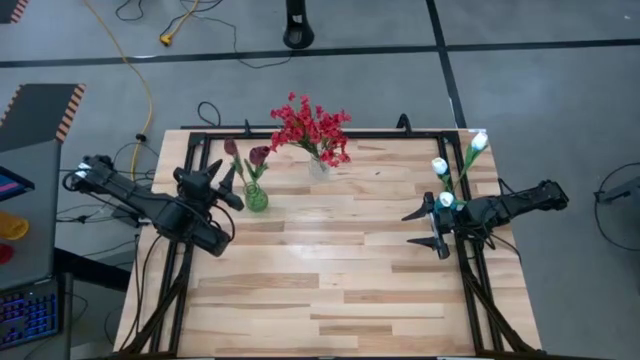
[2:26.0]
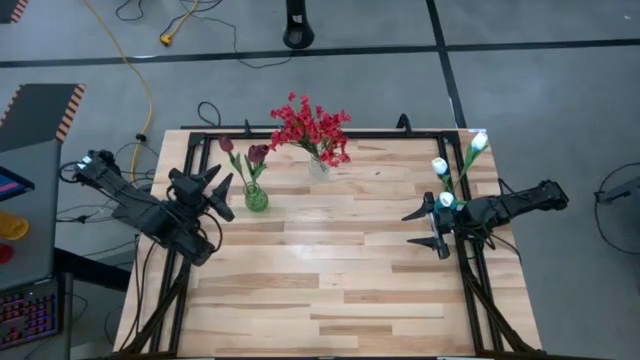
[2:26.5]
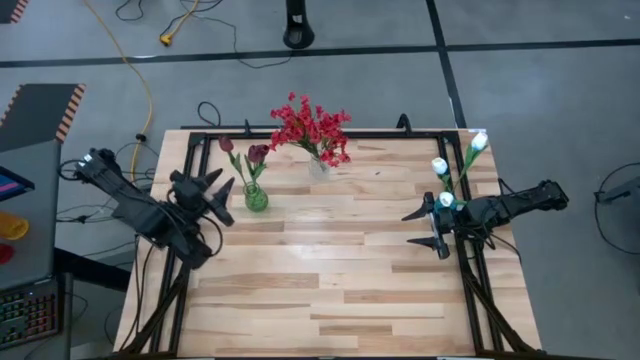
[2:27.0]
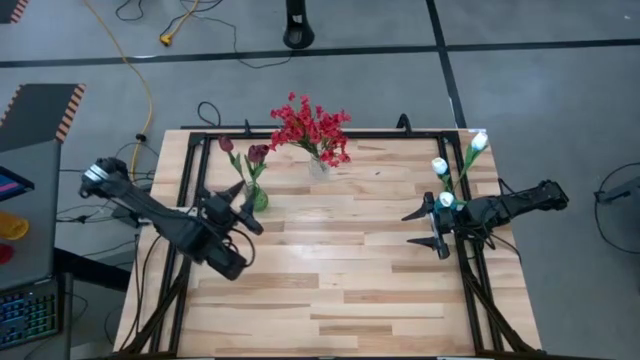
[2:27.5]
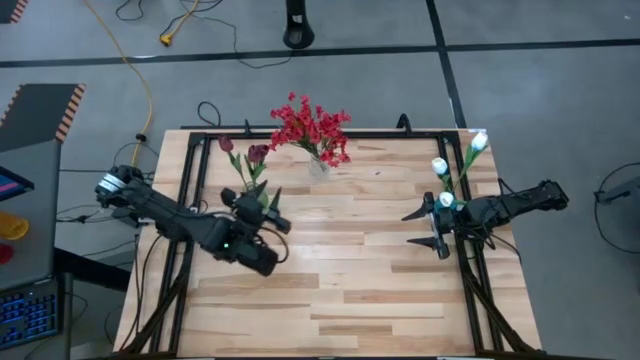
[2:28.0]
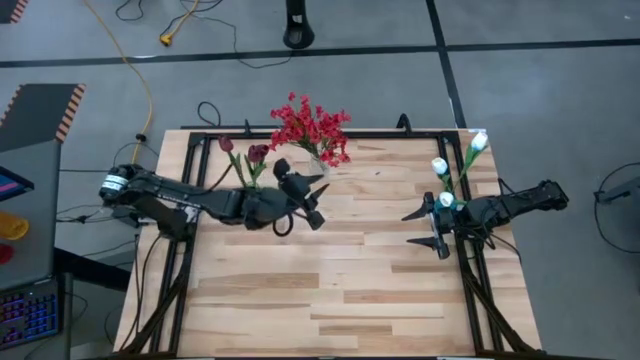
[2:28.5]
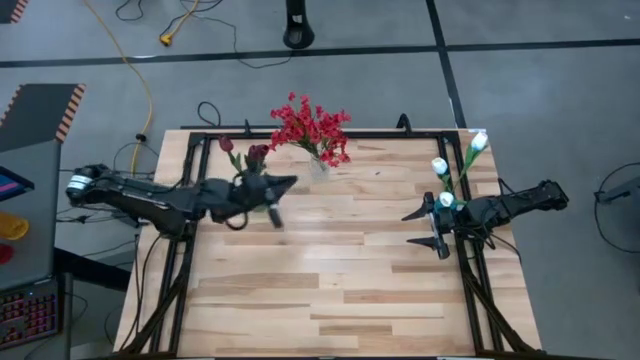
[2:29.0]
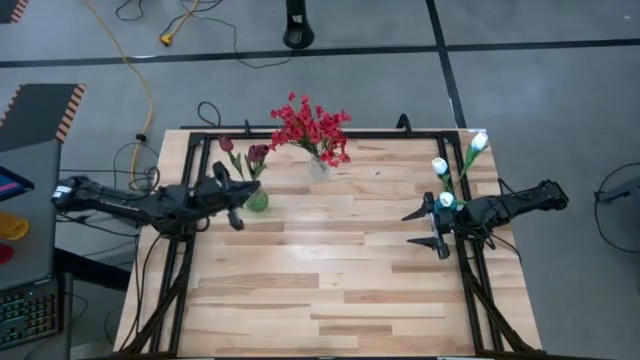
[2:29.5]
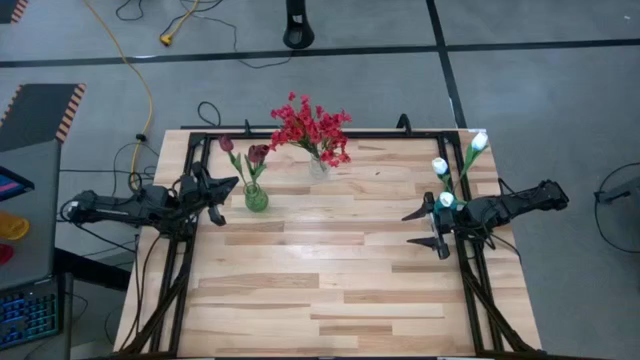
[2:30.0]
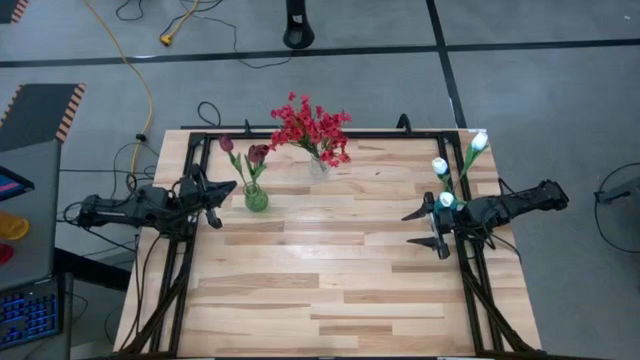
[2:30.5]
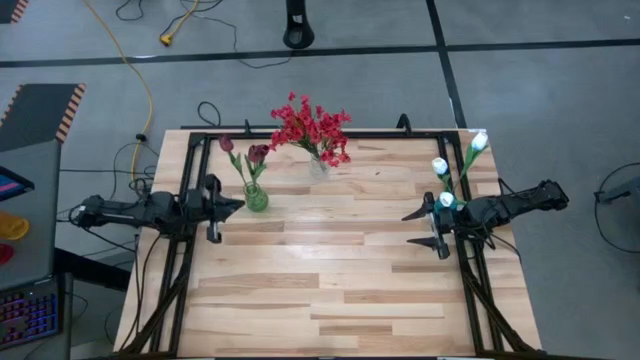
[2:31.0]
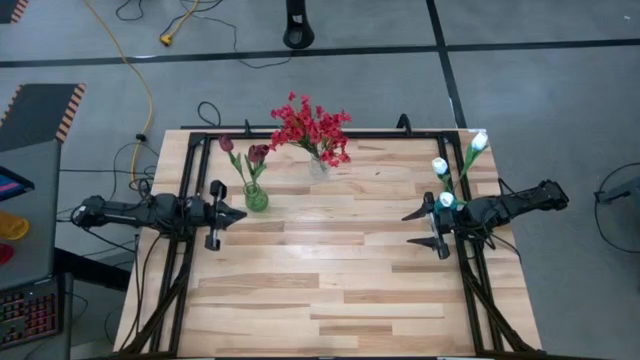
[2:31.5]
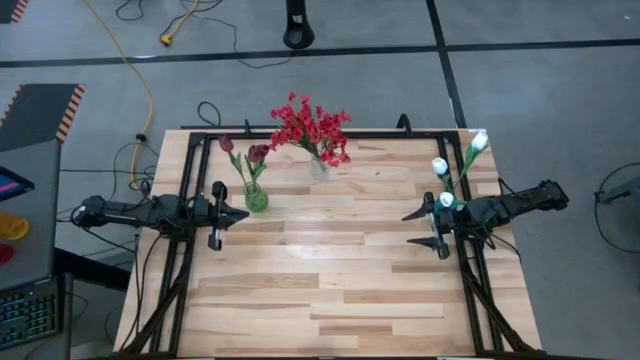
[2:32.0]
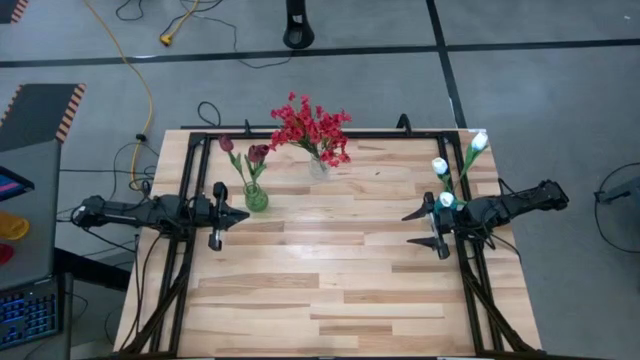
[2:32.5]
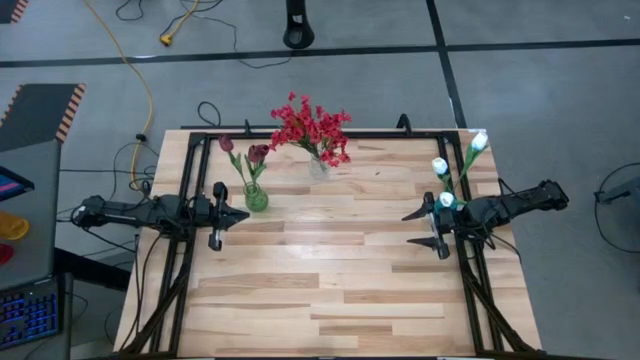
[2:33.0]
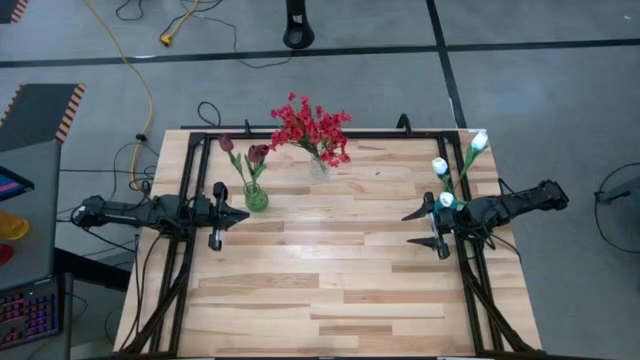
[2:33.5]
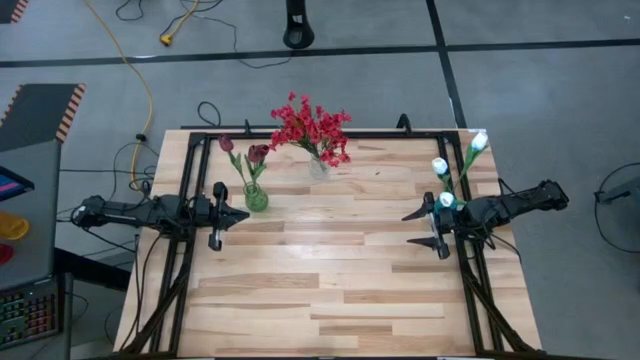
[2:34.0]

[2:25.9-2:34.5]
Task: Sort flowers into vase by color
Return to Home Position

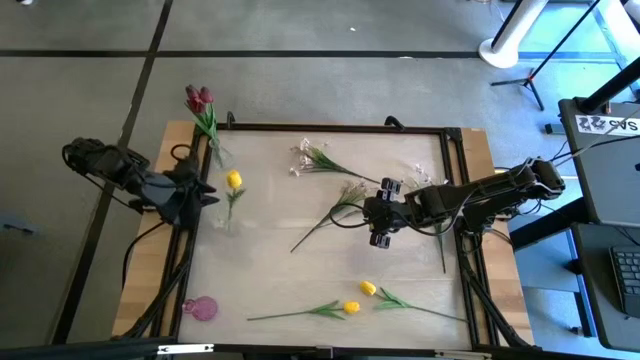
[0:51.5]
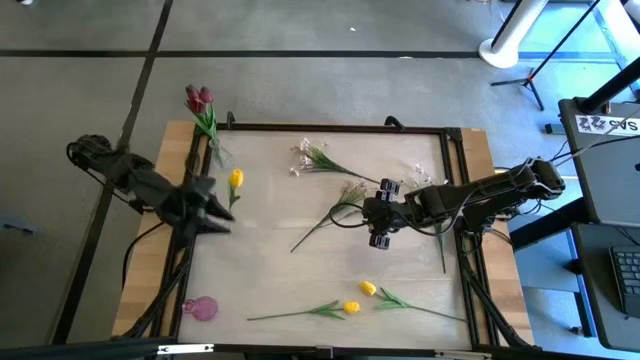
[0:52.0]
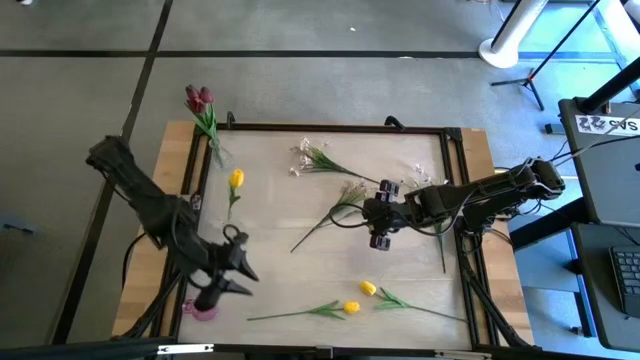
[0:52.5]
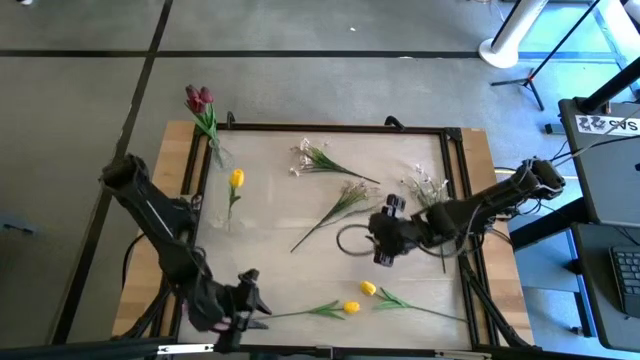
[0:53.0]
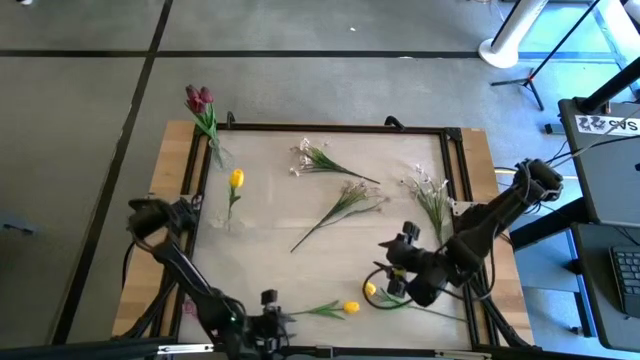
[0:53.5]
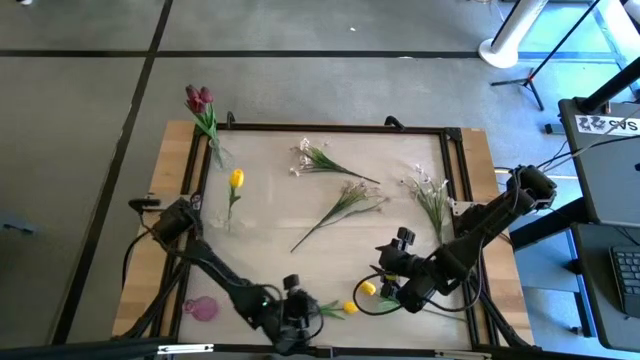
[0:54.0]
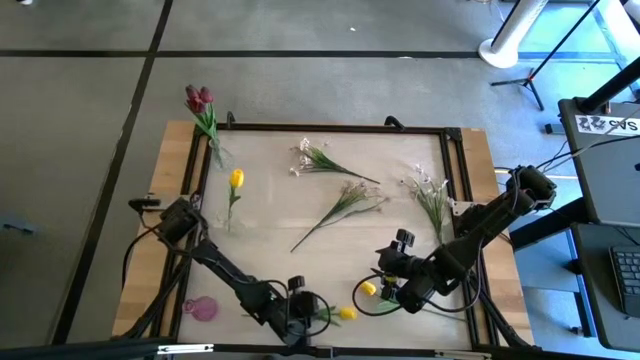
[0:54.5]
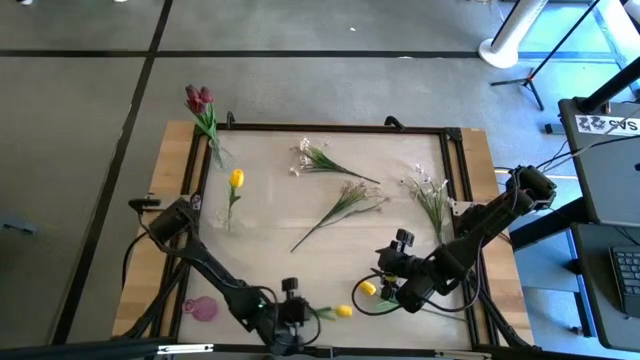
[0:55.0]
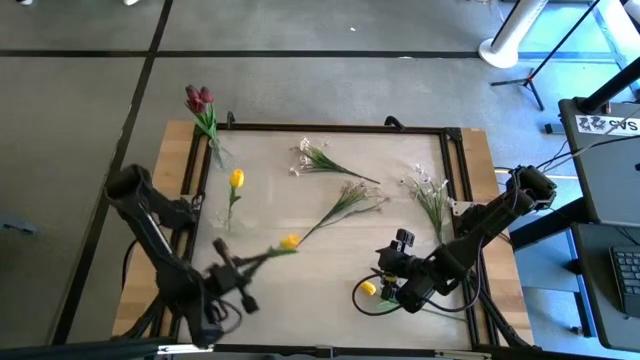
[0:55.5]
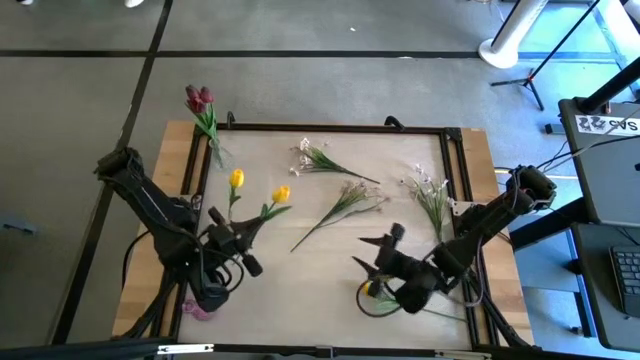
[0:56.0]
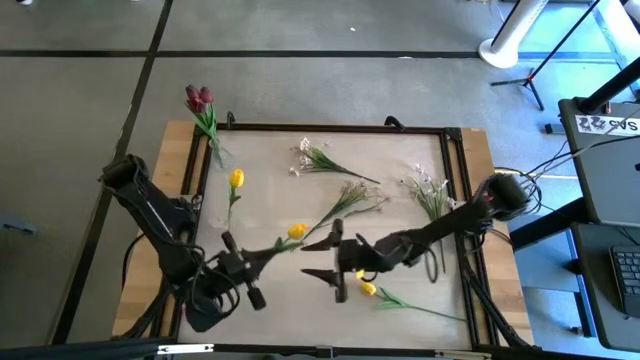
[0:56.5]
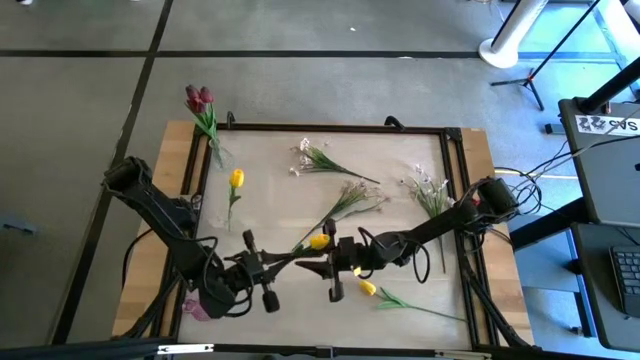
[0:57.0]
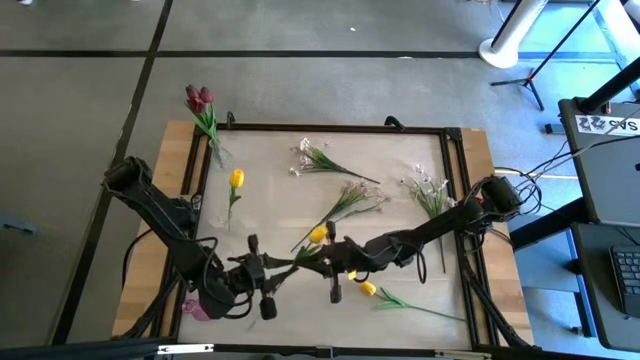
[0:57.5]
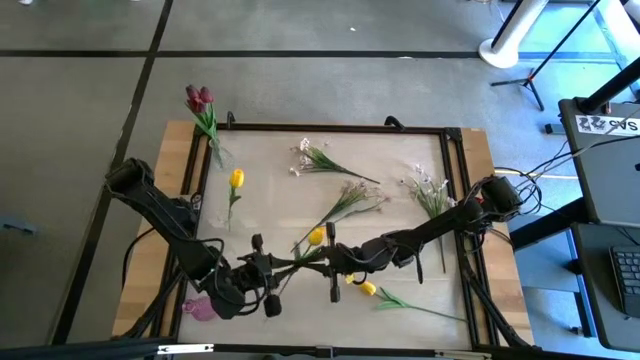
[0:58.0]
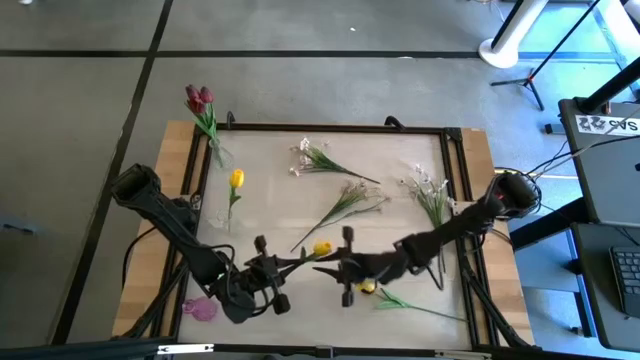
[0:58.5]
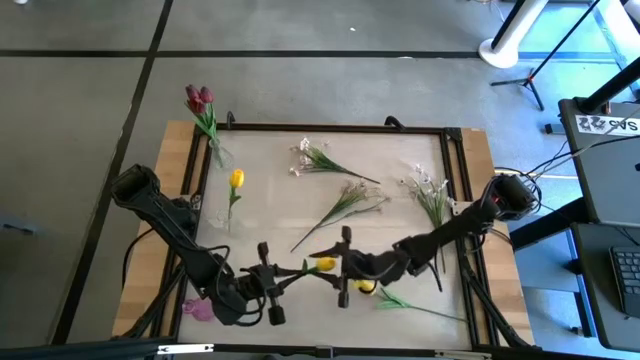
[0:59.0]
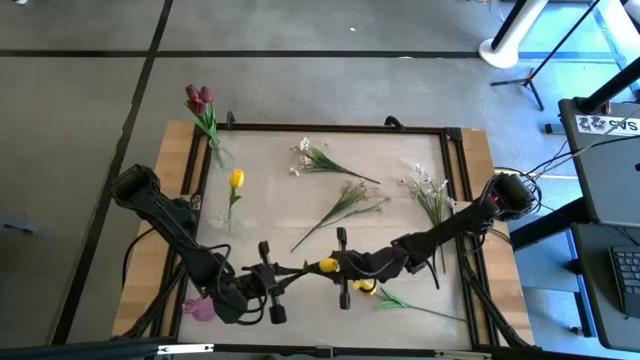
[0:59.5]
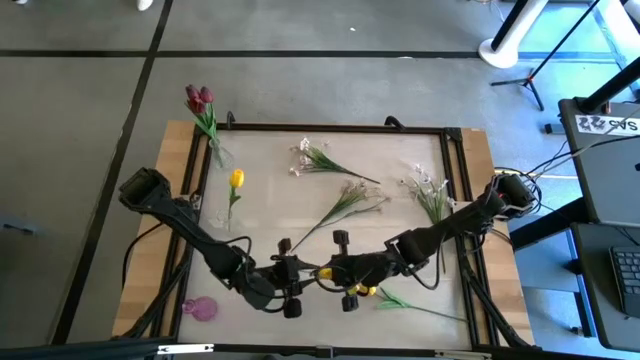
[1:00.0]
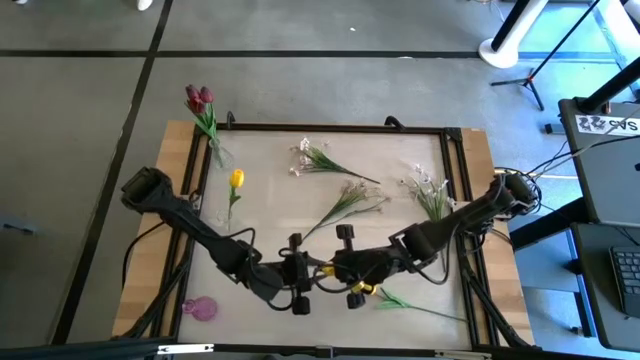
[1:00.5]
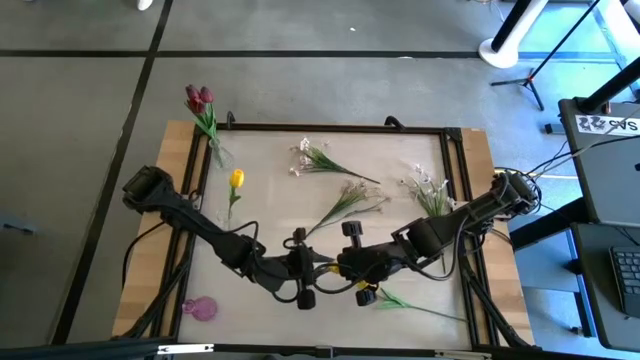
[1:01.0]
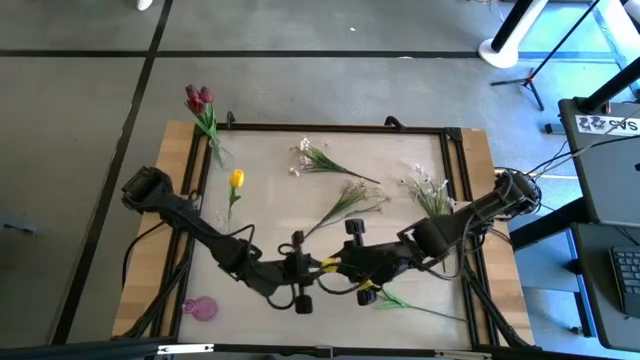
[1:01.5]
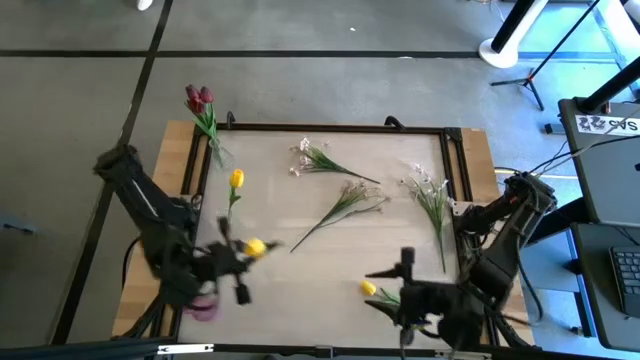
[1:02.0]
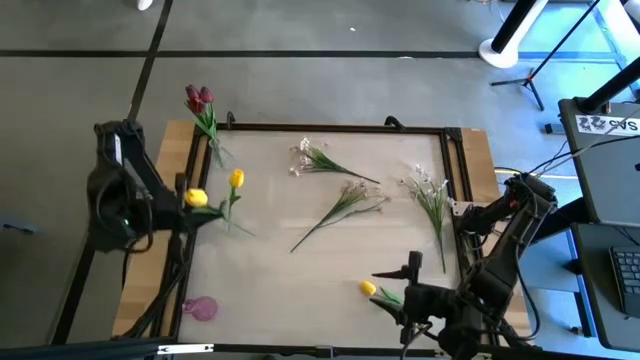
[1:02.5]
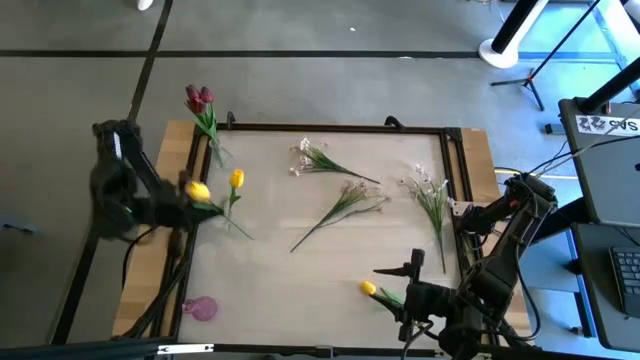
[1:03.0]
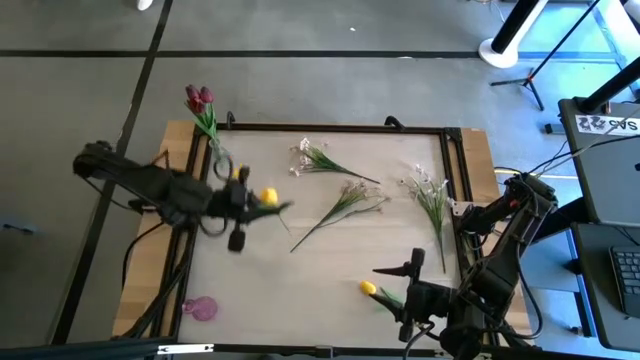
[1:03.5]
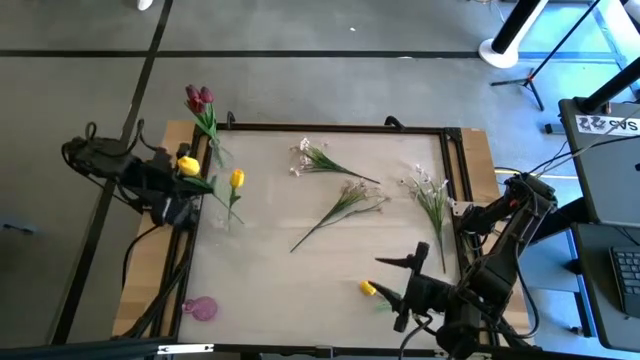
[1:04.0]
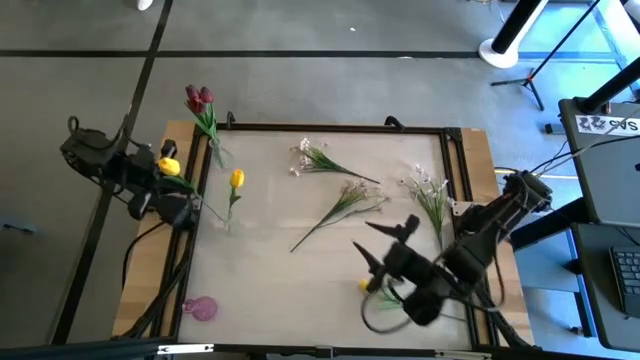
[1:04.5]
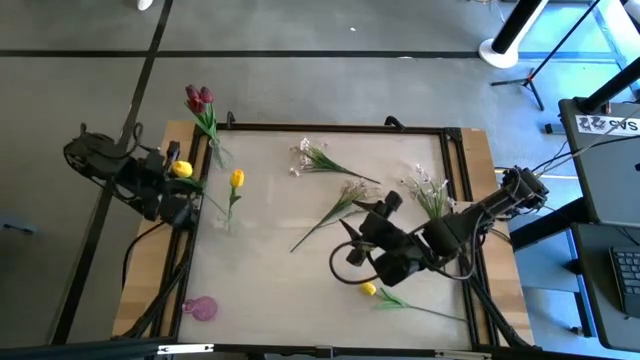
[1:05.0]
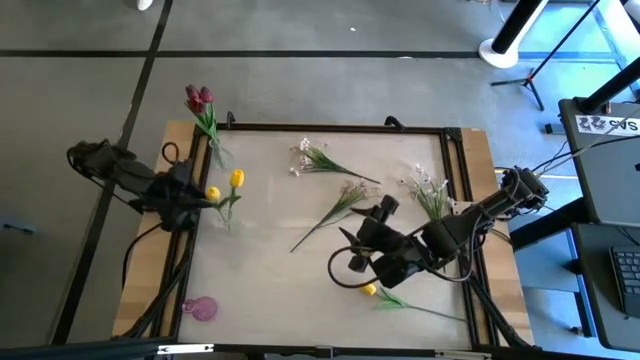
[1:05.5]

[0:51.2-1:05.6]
Task: Sort flowers into vase by color
Put the left yellow flower into the bottom transparent vase
